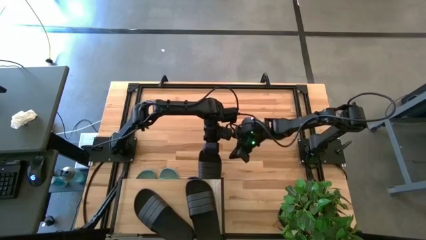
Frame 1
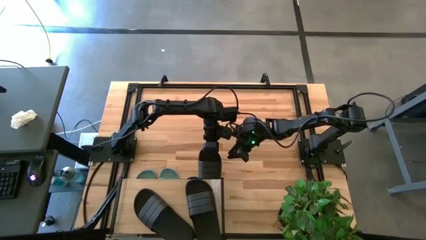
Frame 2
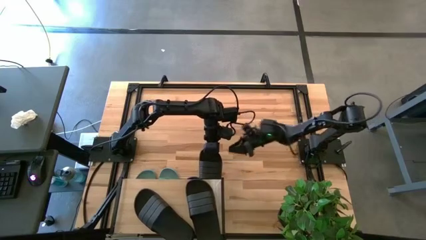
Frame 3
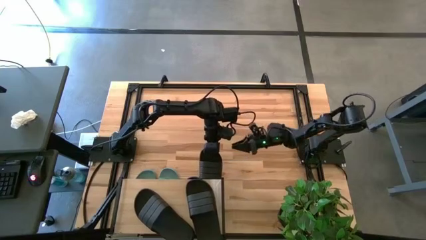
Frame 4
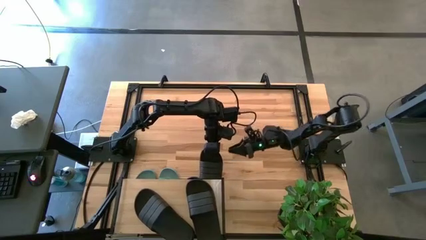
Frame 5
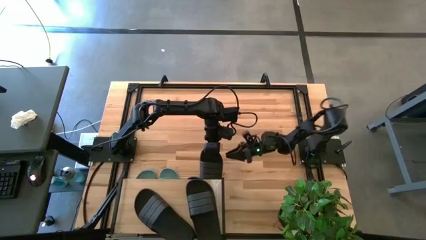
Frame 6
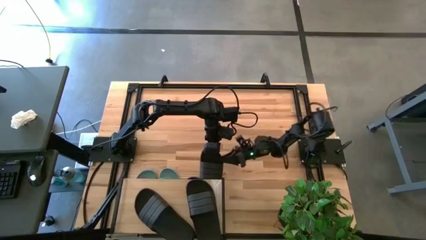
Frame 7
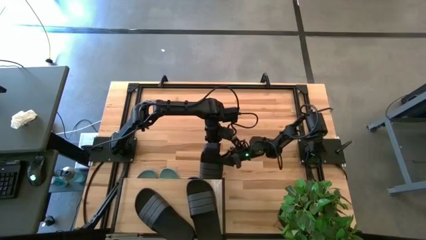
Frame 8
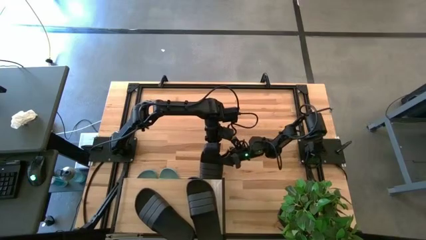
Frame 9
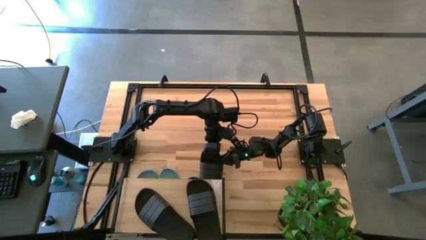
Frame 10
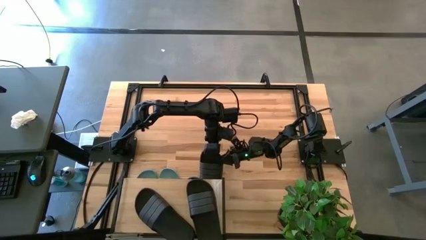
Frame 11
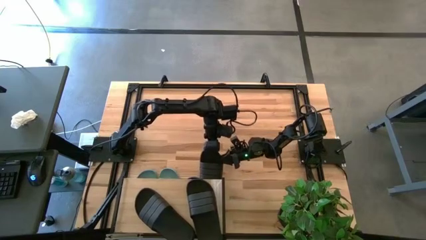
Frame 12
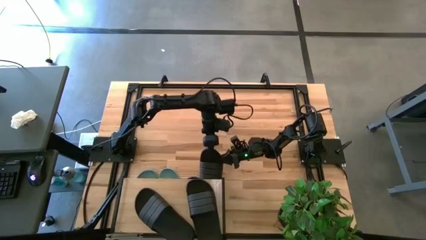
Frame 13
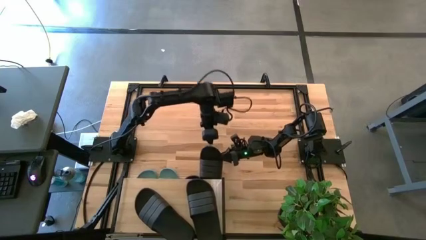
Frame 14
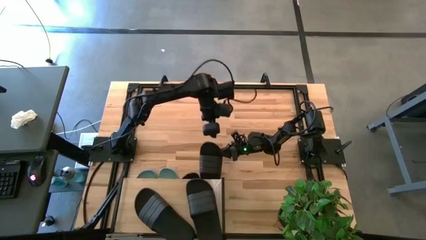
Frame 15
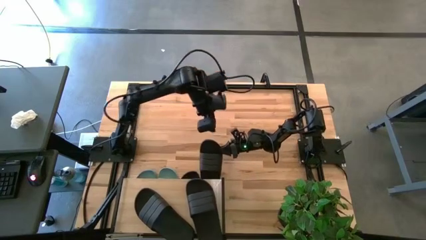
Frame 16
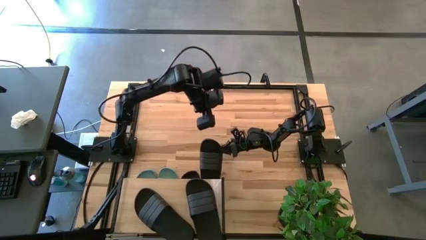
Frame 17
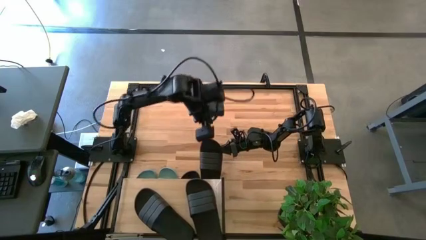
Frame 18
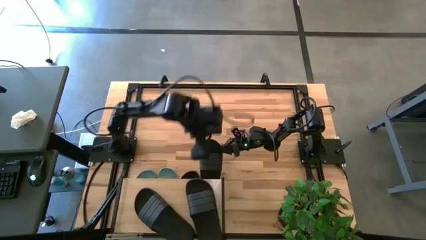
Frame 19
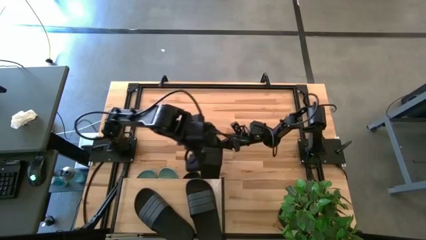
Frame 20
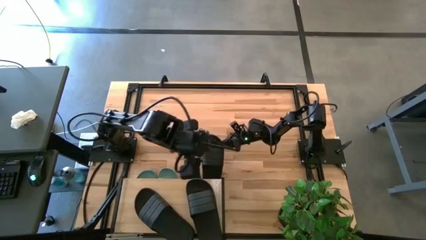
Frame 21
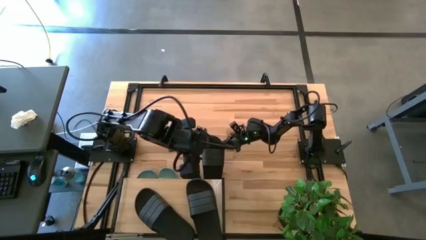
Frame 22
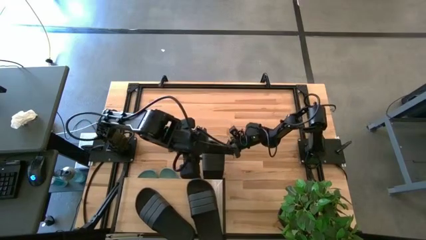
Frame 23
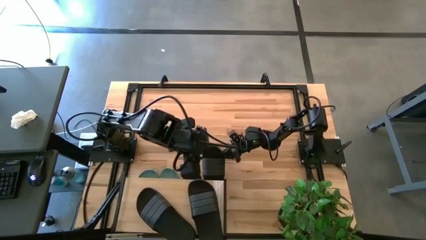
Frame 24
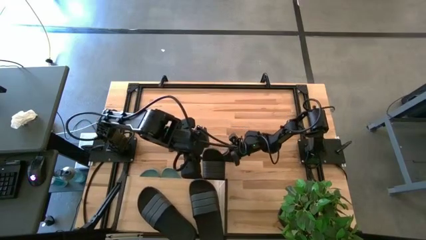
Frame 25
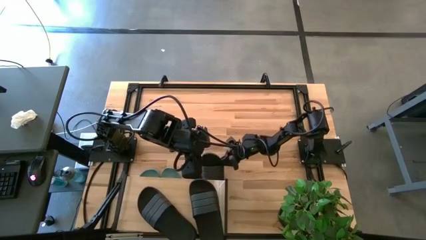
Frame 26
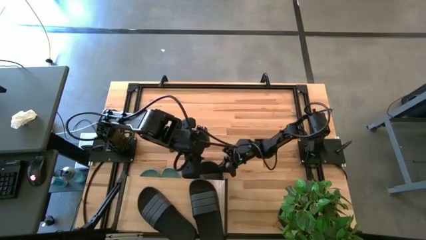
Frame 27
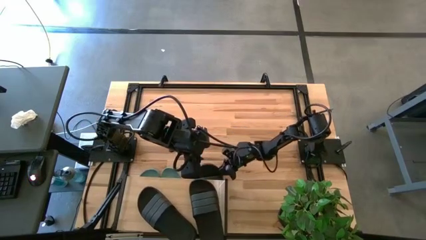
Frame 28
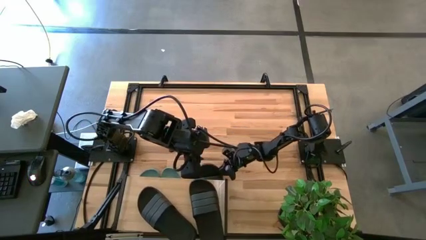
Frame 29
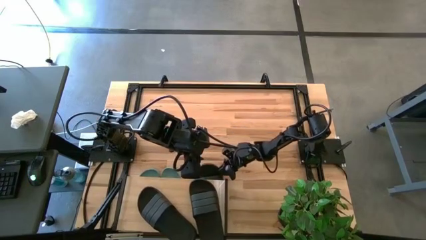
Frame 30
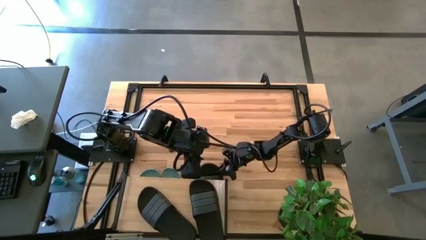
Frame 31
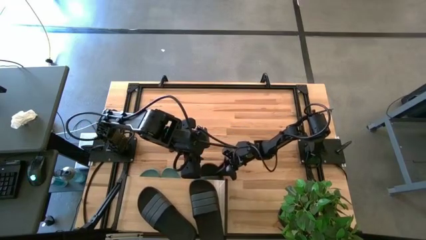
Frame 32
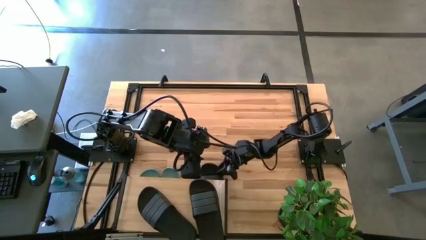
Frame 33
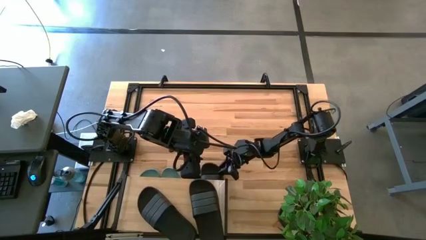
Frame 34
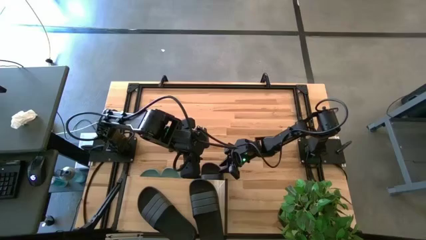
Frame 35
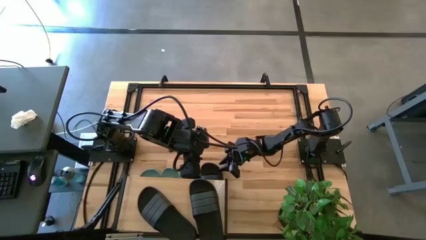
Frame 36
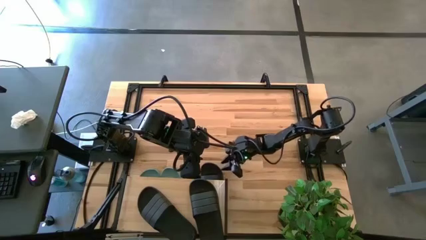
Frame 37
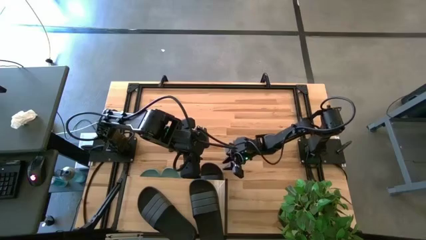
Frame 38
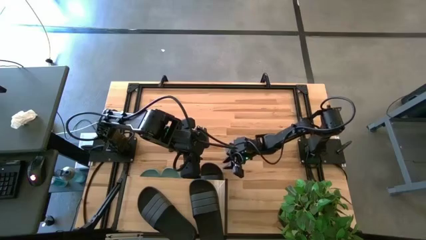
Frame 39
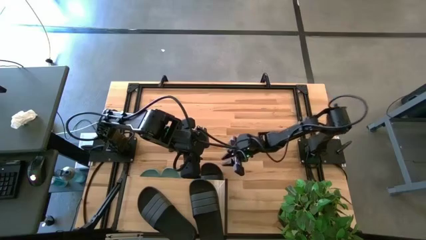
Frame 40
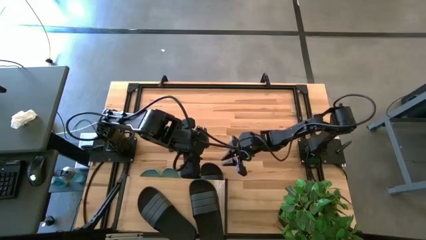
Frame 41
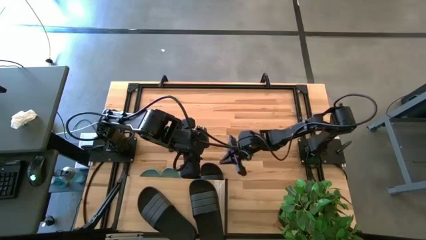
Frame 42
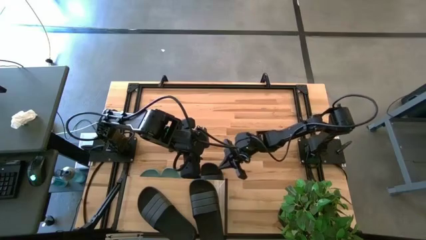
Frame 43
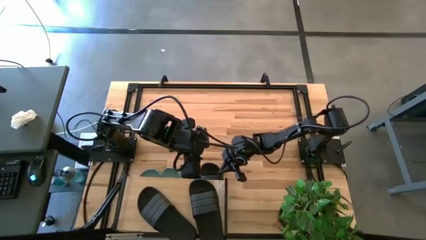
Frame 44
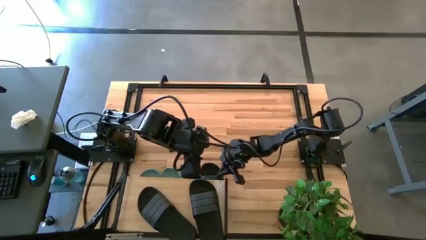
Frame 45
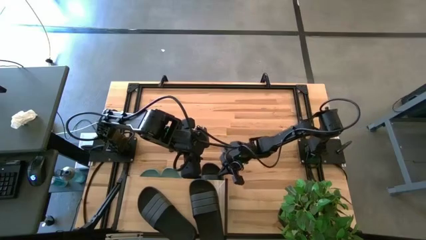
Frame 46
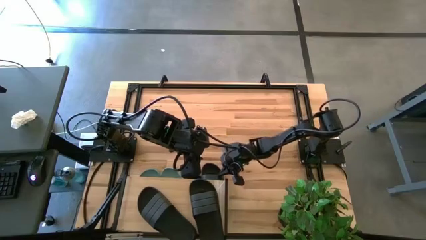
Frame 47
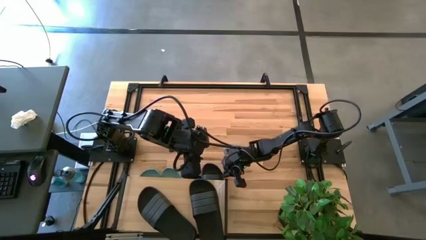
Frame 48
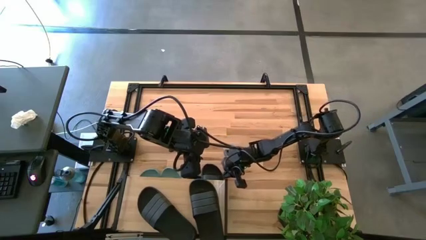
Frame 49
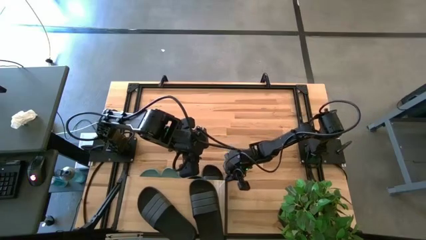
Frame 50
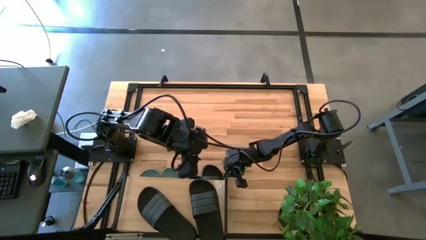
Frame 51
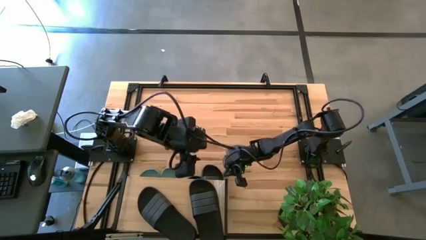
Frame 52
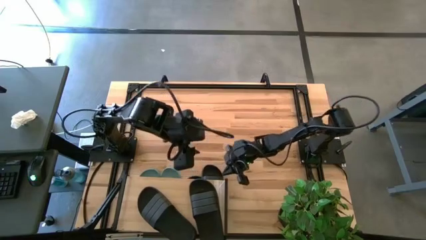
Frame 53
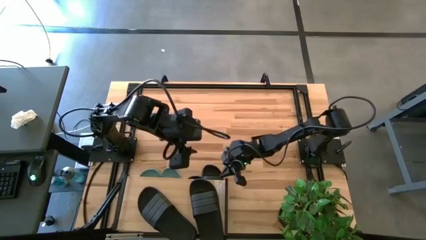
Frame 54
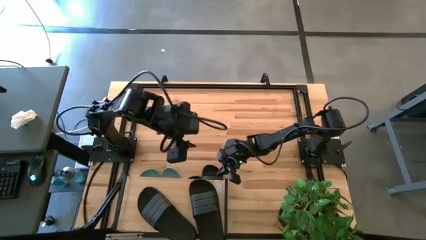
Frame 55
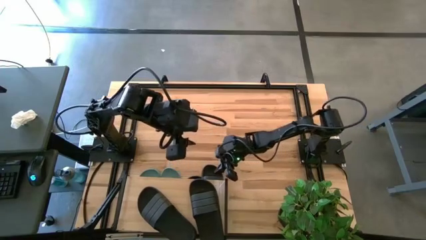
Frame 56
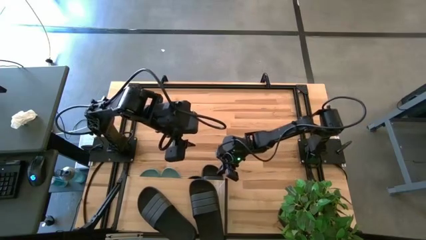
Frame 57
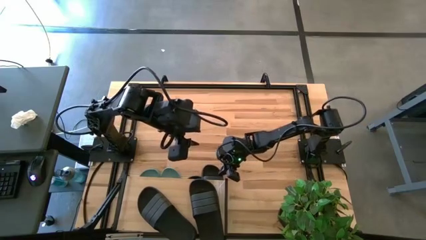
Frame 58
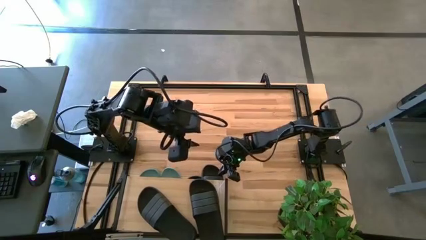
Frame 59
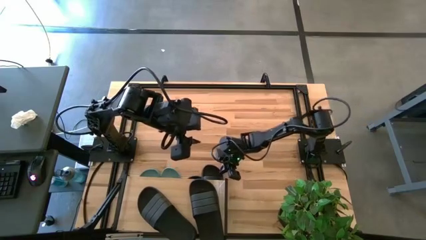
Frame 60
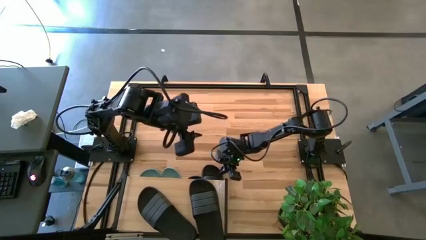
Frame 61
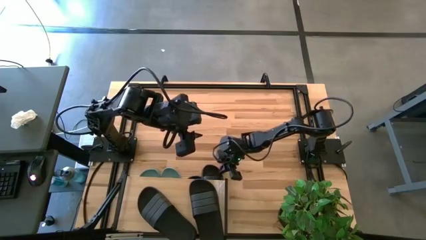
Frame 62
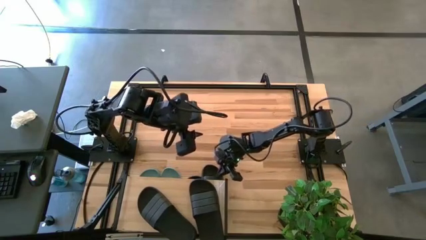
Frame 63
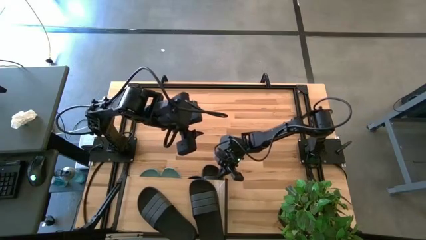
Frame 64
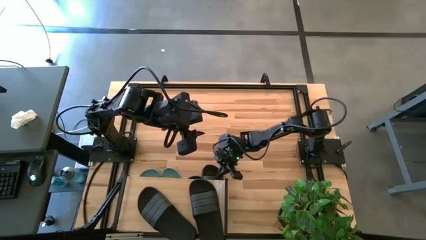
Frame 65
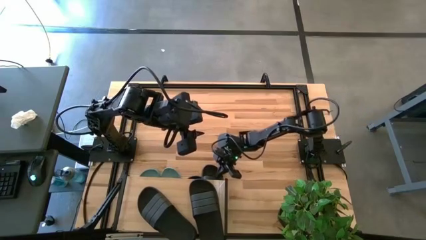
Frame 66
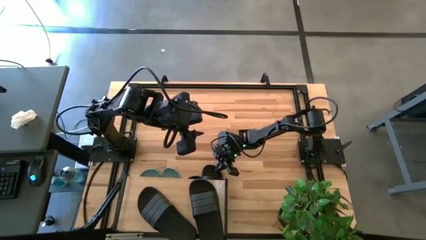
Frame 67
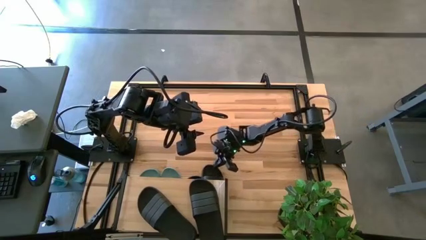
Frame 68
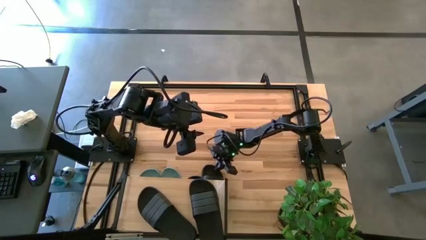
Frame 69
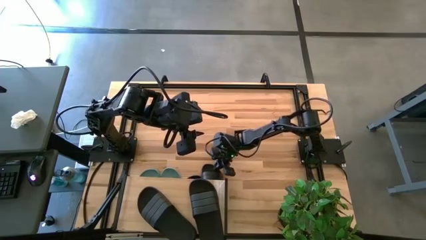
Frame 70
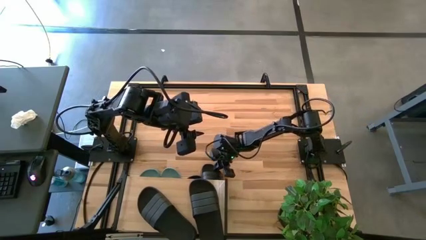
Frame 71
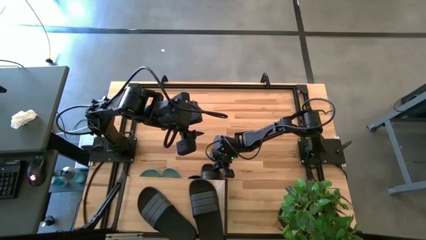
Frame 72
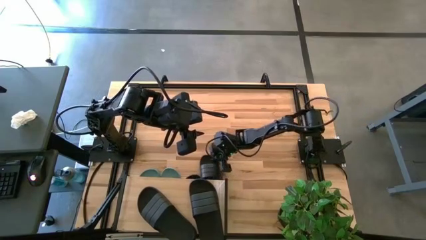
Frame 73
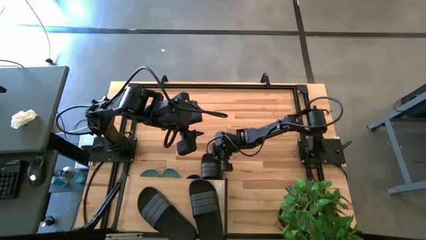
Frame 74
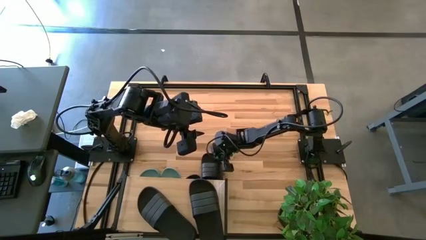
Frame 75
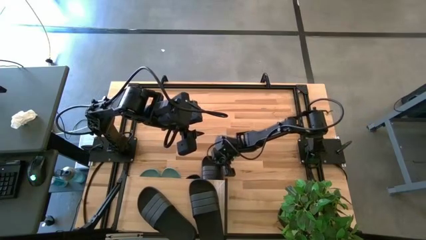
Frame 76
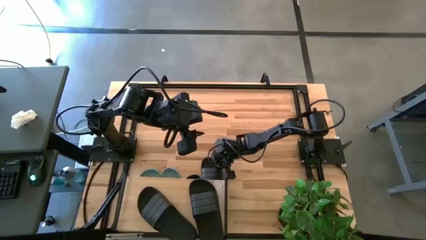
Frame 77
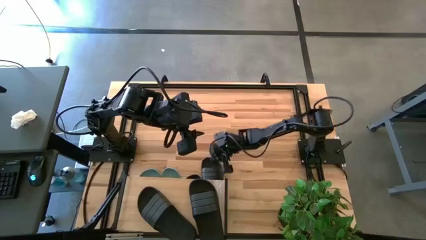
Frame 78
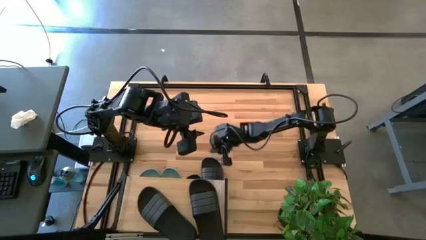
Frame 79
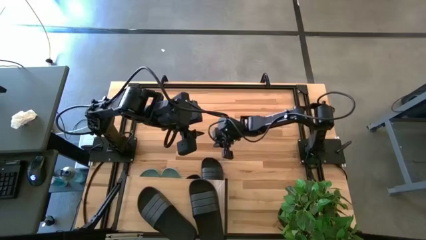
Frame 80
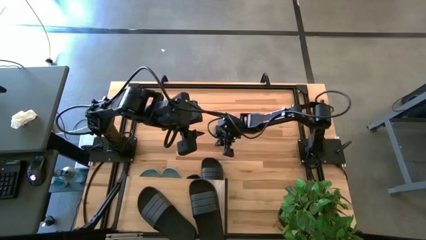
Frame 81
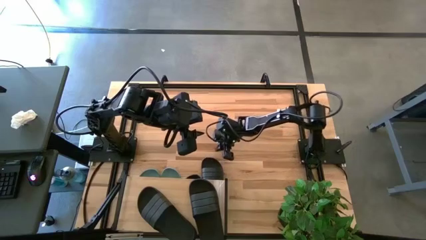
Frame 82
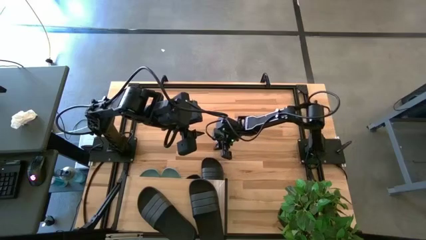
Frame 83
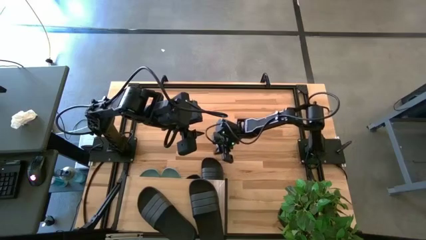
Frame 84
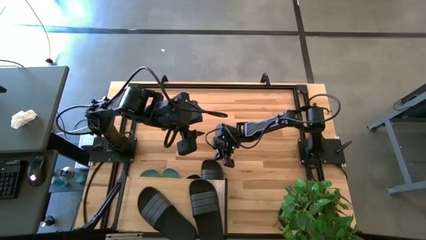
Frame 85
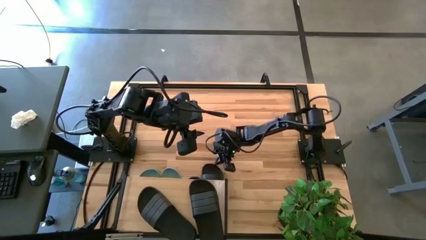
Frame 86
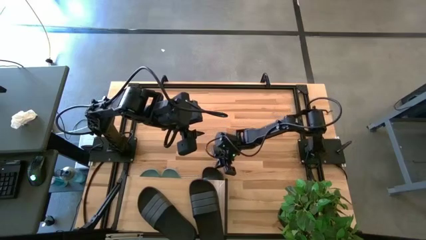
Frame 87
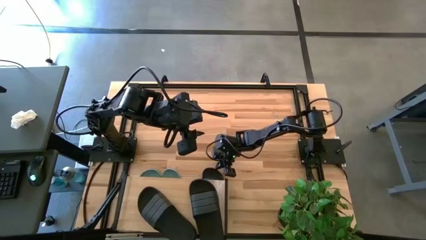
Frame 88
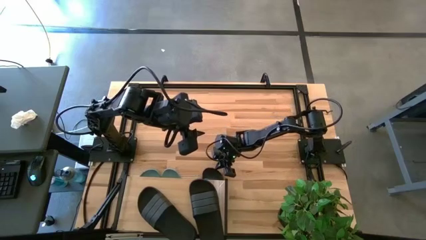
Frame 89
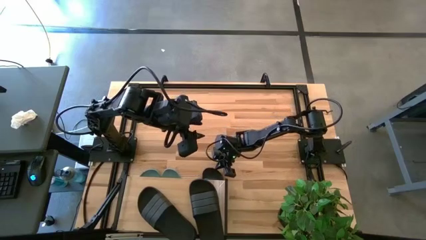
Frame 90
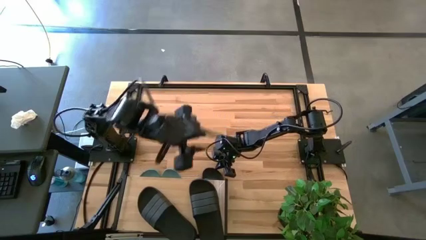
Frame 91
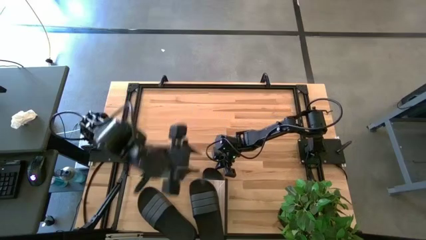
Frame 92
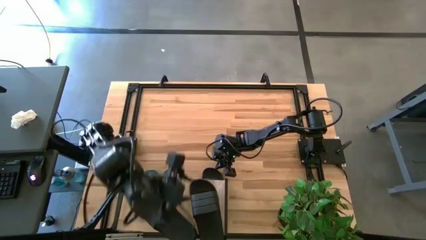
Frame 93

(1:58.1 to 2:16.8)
Task: Pick and place slides into the shelf
Put the black slipper under the shelf
